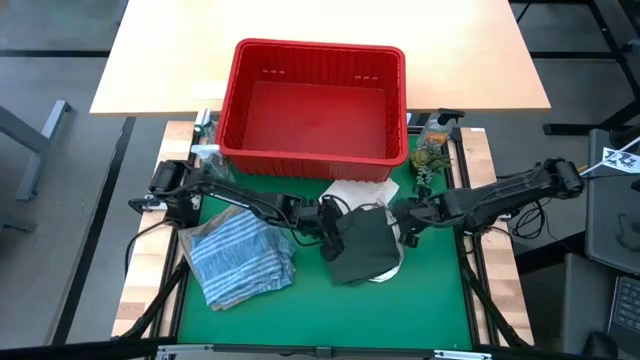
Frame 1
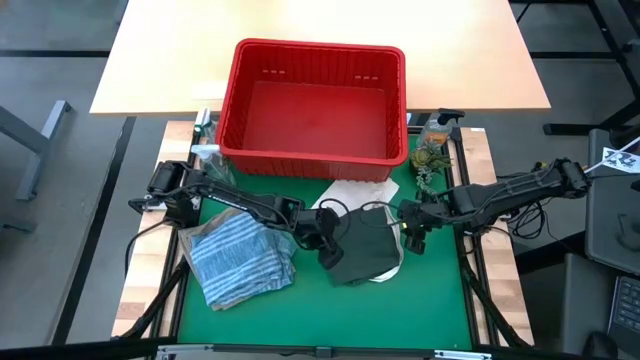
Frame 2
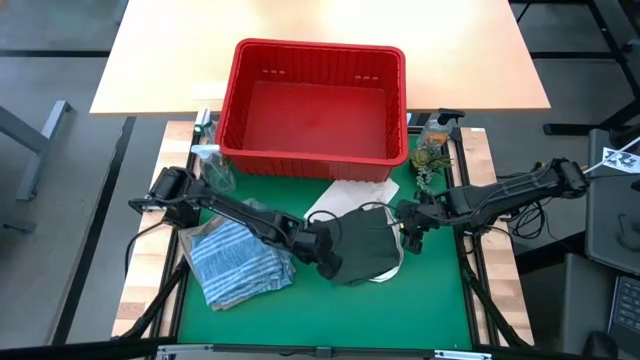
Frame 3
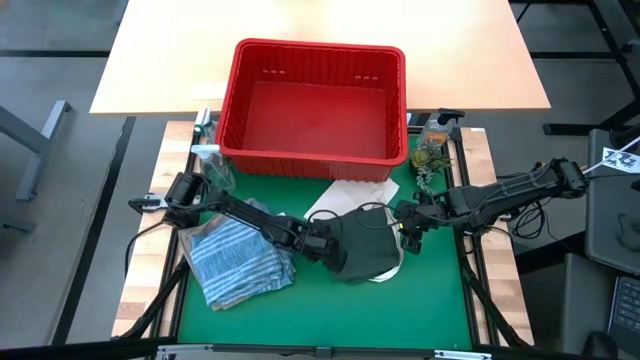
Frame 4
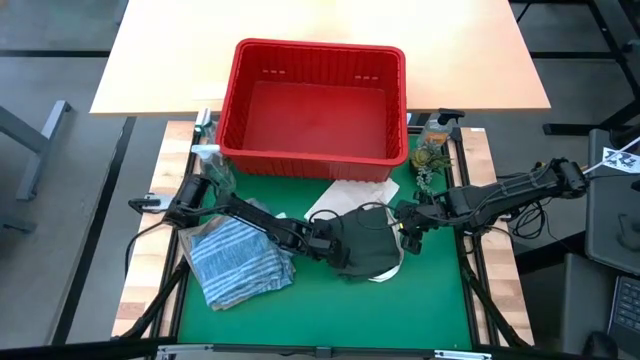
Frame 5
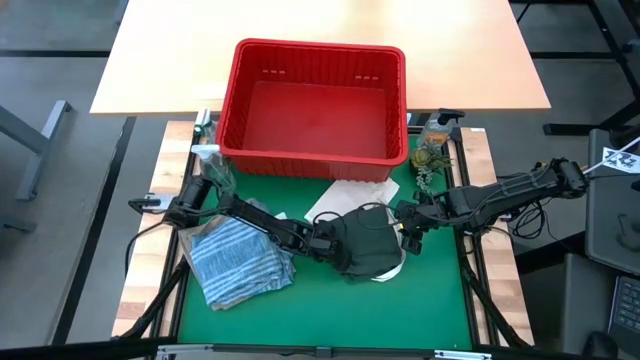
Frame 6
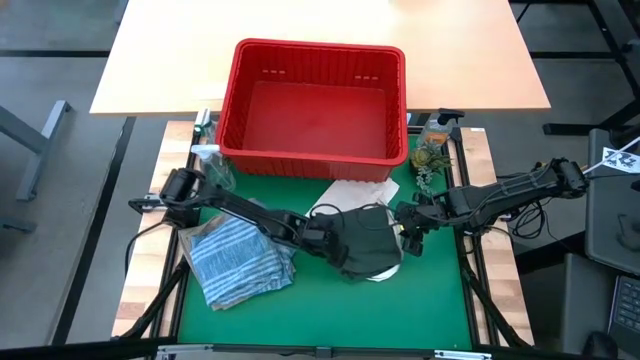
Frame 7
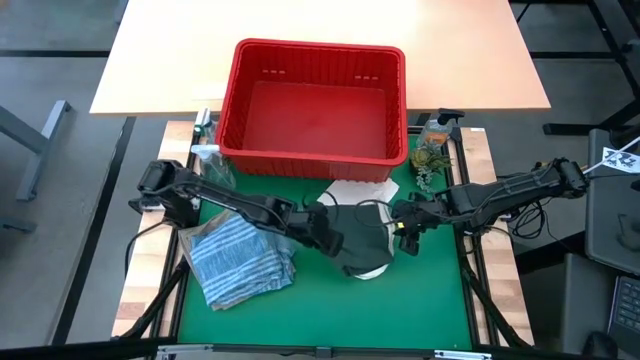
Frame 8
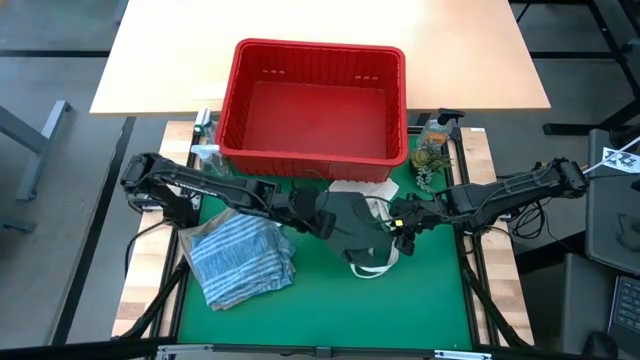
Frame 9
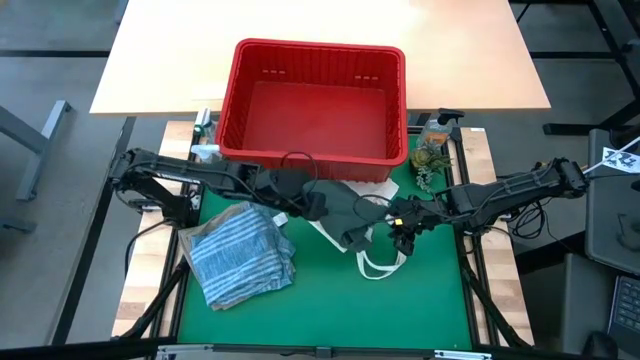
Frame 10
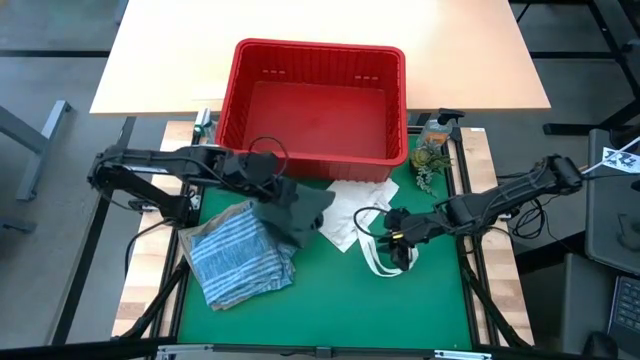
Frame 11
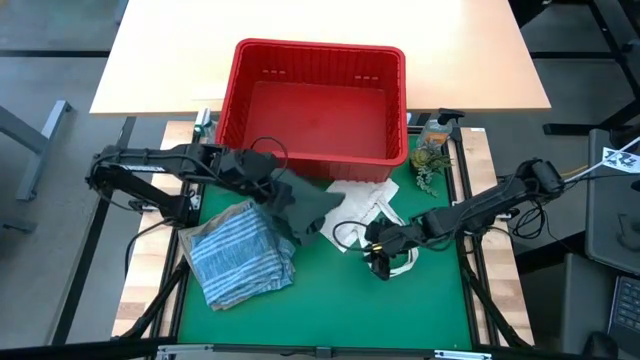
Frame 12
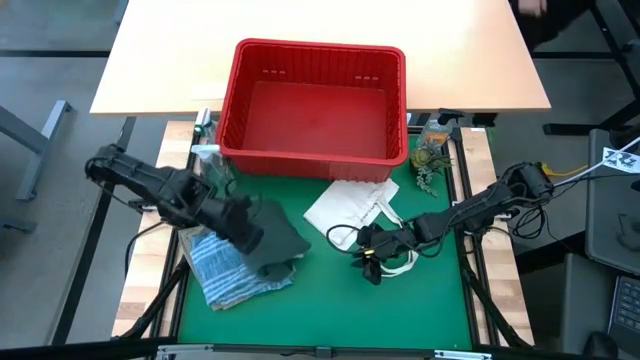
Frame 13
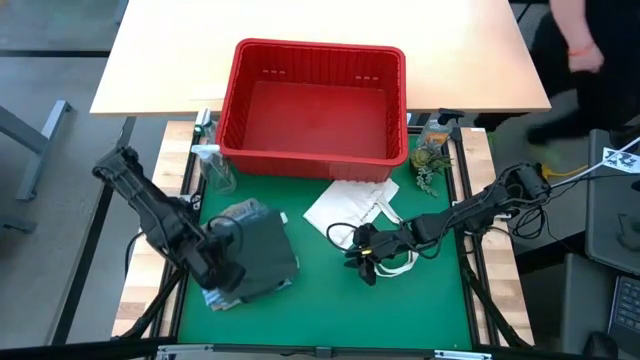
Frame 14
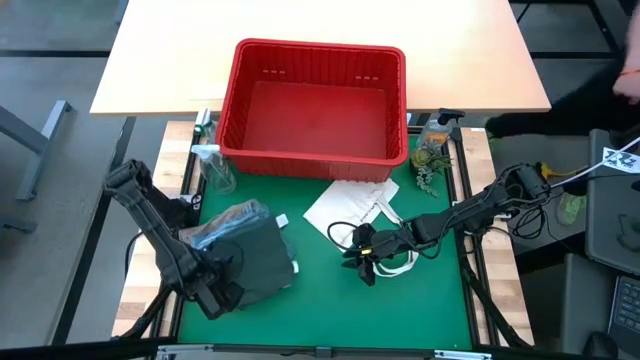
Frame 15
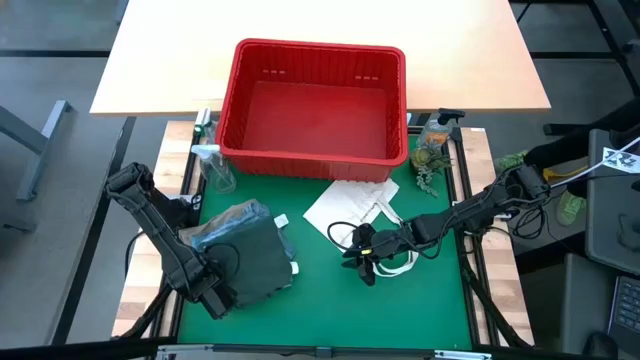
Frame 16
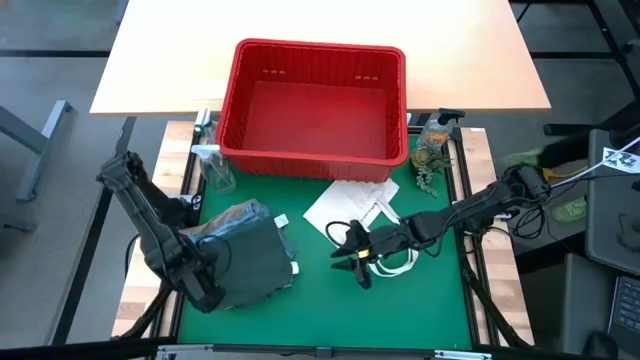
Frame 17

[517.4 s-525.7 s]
Task: Fold Laundry from Bin
Stack the folded green polo shirt on top of the blue polo shirt

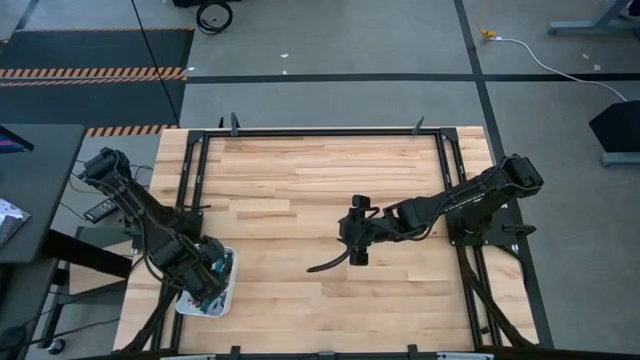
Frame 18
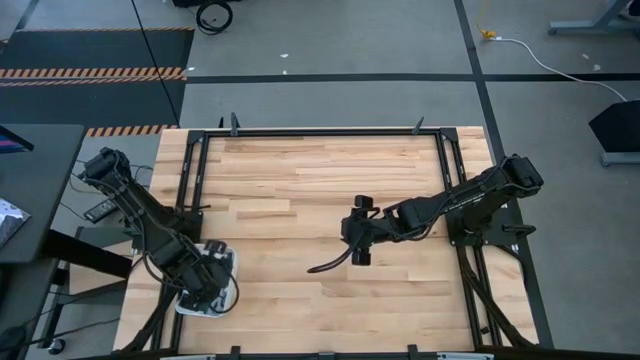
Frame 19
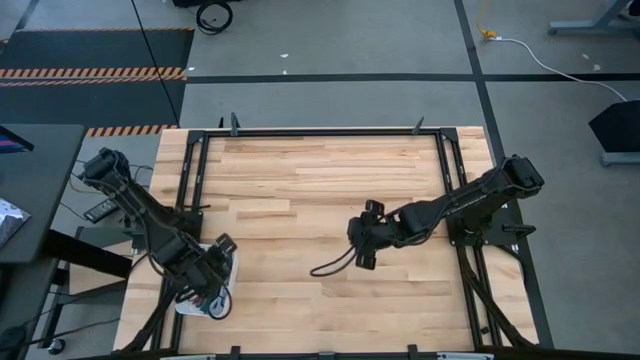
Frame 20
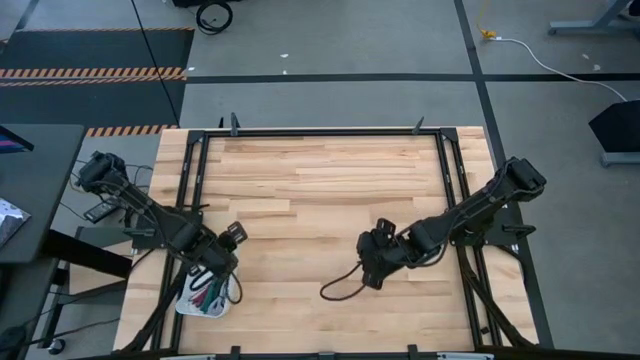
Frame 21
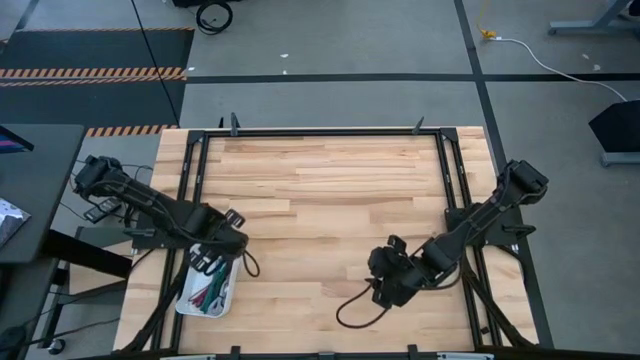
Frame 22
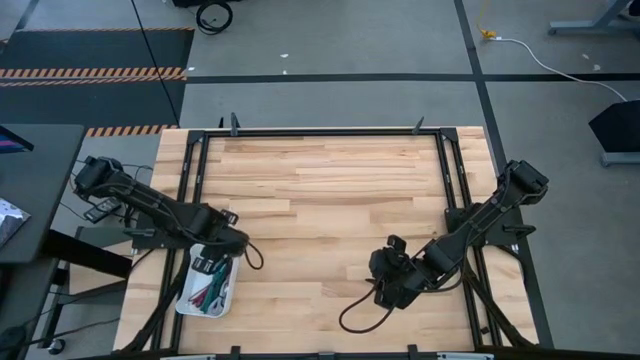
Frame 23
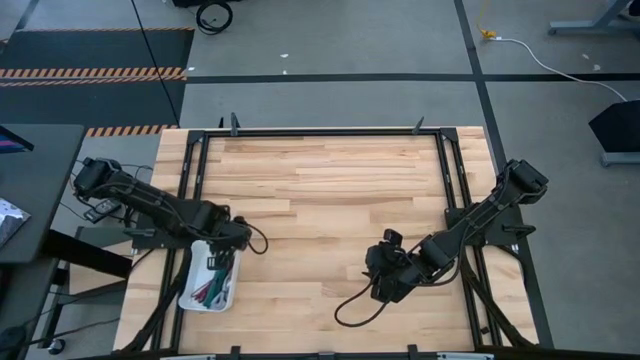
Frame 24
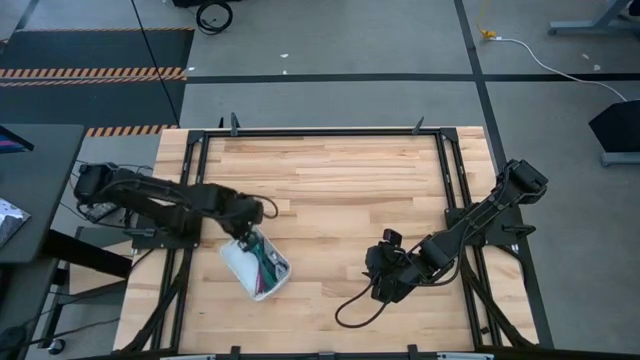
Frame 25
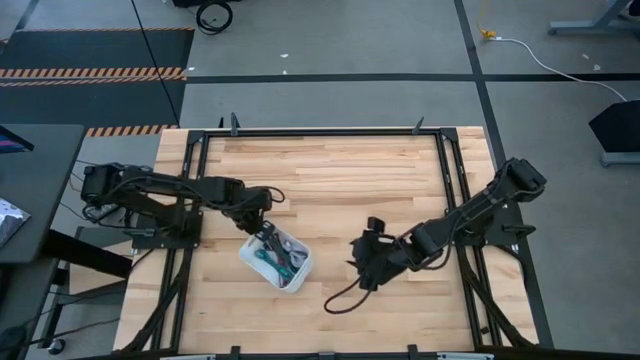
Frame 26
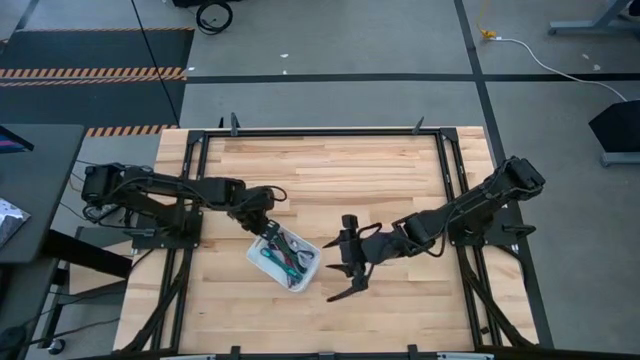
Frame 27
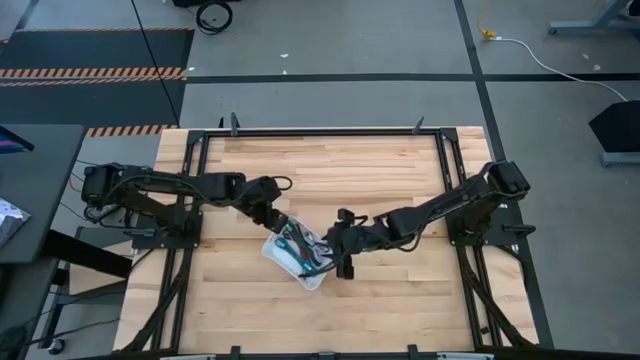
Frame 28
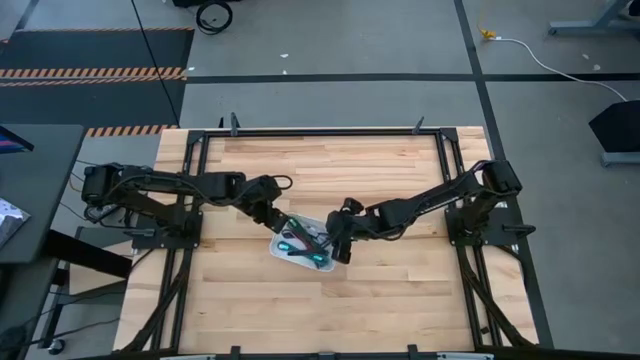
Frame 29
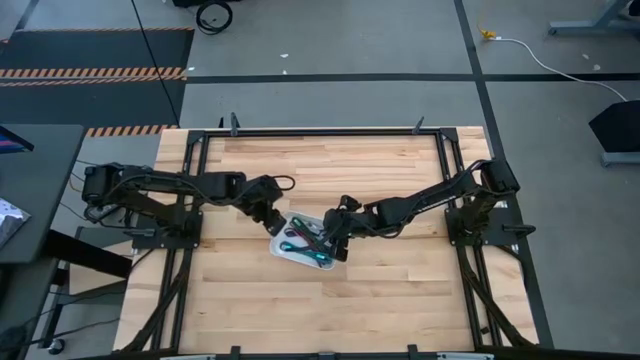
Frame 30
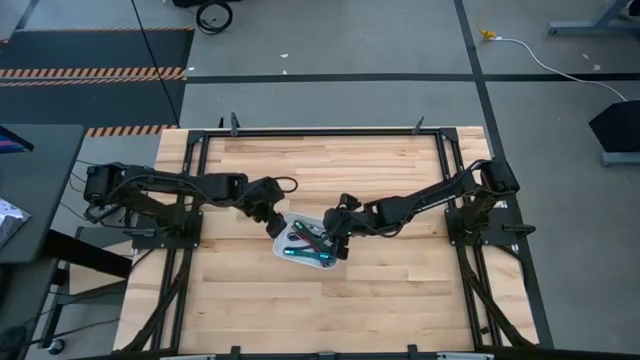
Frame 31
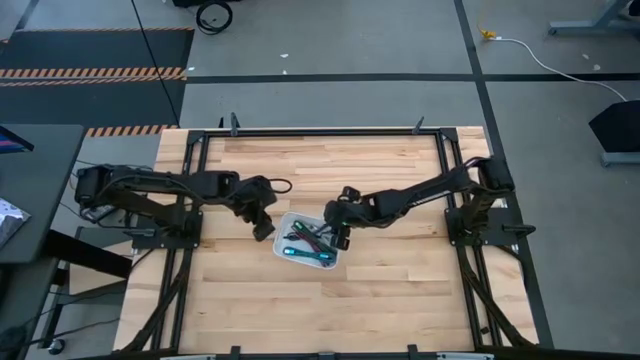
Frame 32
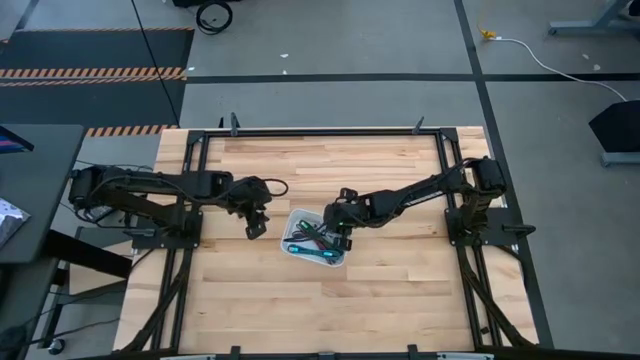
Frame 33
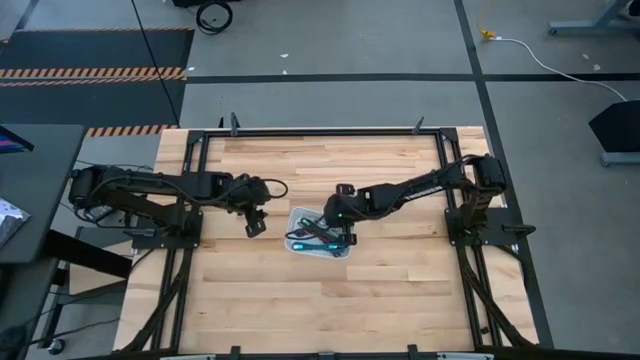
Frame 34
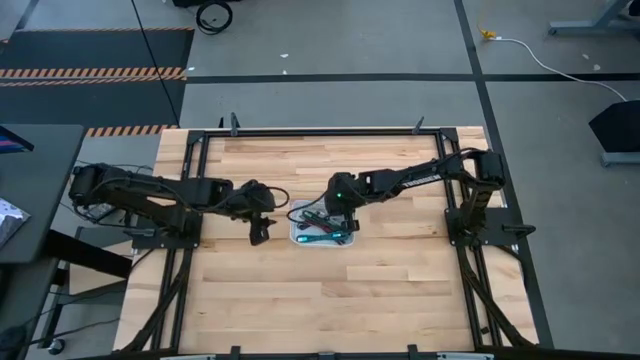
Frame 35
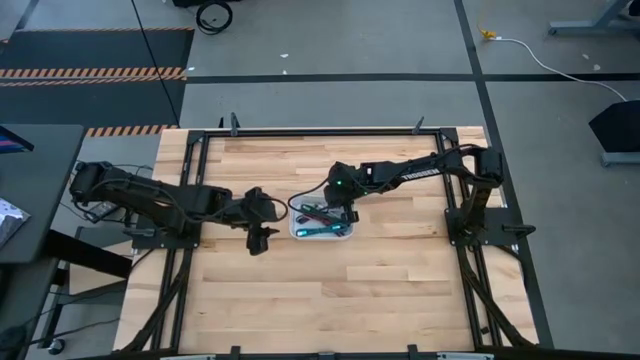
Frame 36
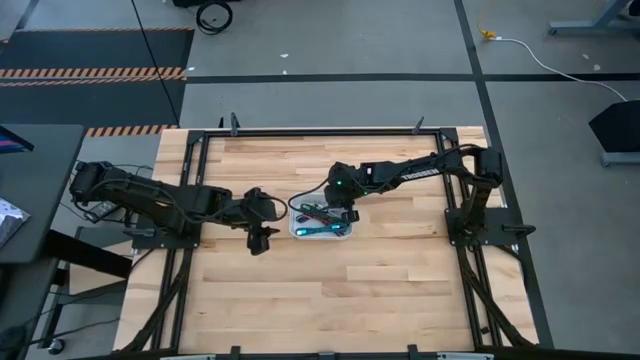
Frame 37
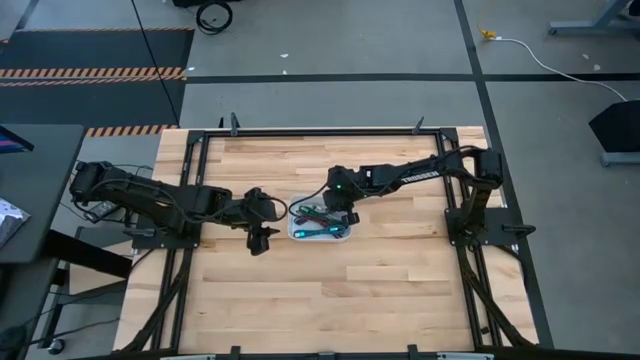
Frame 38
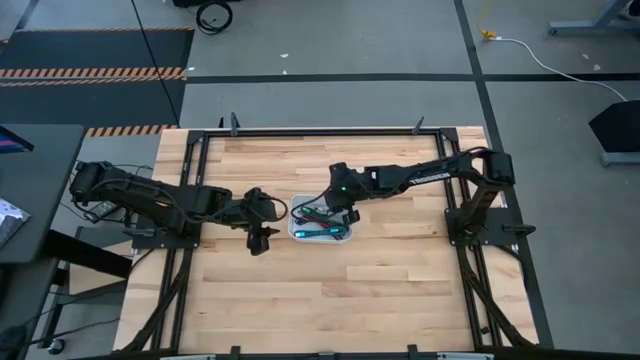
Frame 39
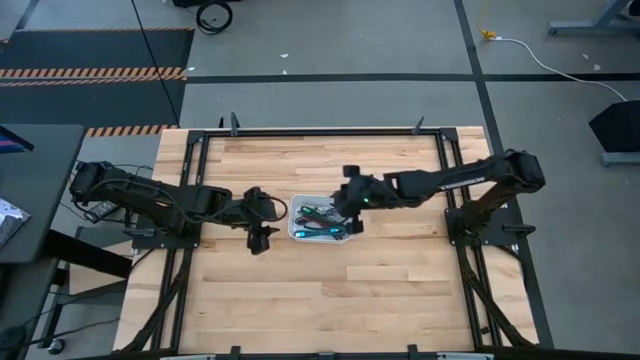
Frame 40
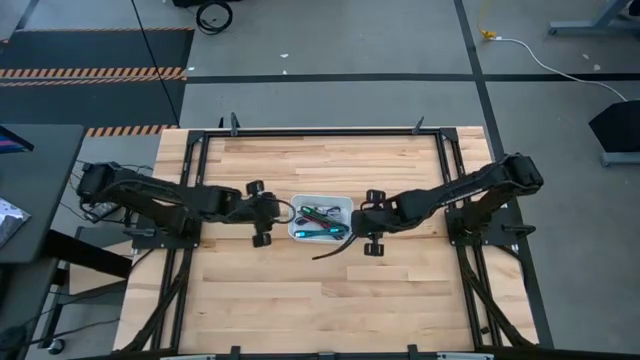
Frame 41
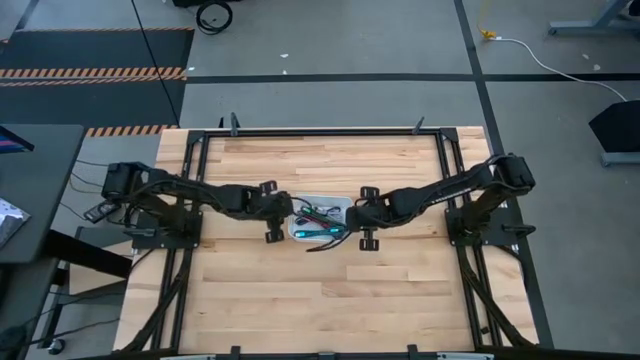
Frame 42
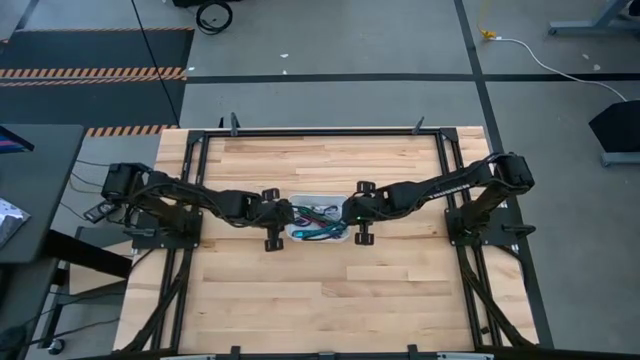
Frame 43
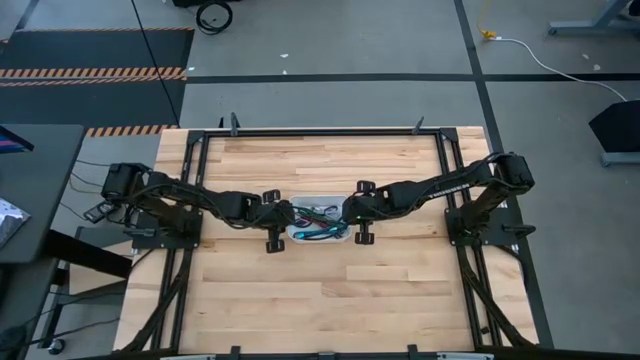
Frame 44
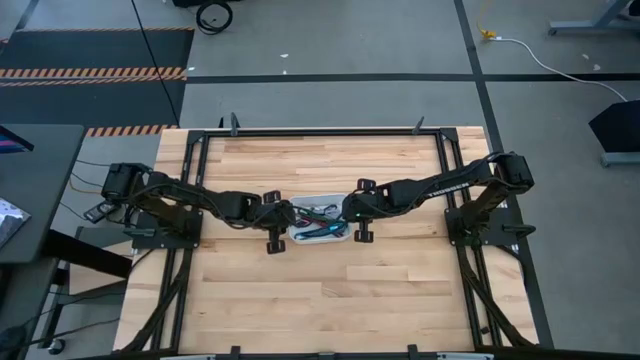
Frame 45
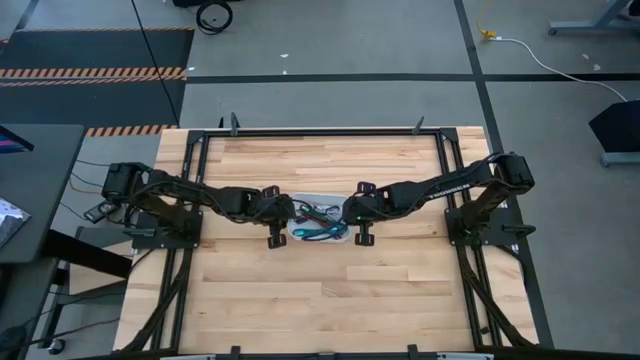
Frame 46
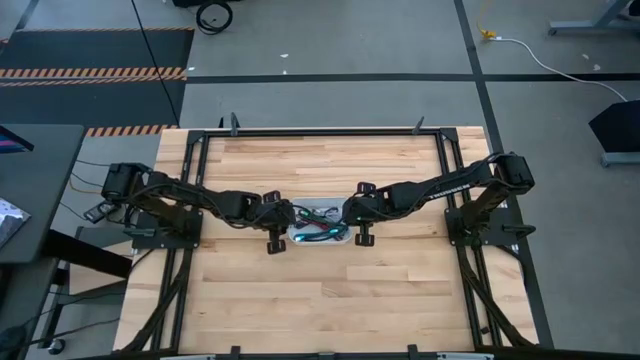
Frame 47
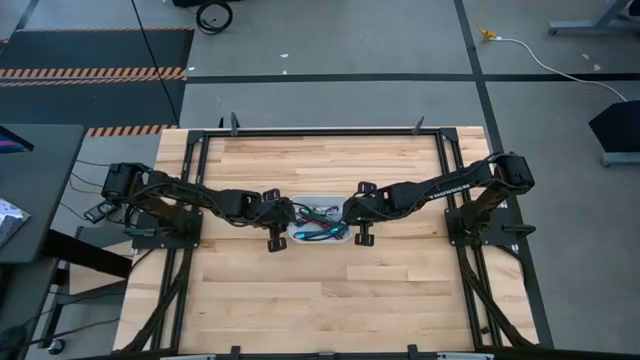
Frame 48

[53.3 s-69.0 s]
Task: Pick and place USB-C Cables
Move the white bin to the center of the table
